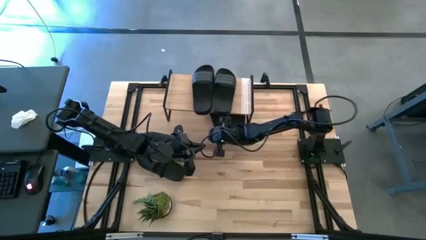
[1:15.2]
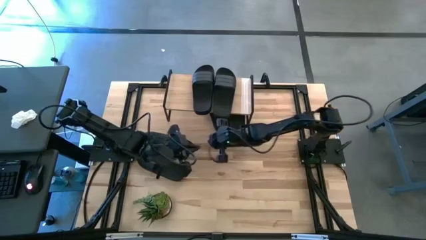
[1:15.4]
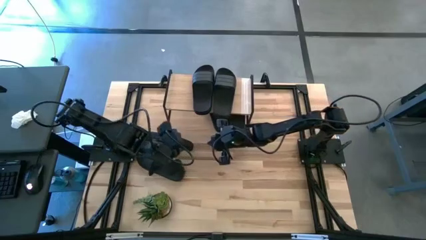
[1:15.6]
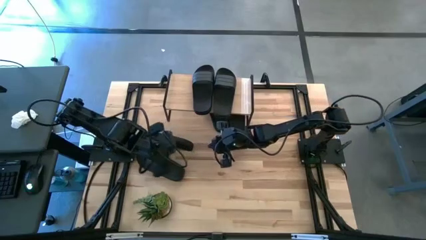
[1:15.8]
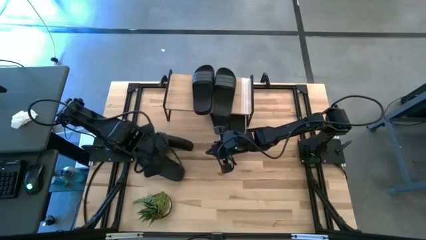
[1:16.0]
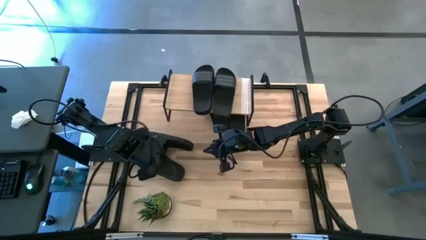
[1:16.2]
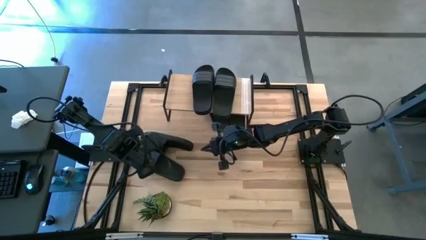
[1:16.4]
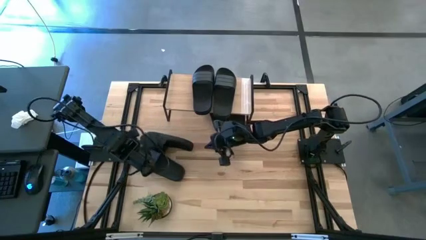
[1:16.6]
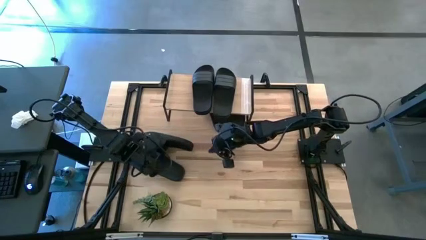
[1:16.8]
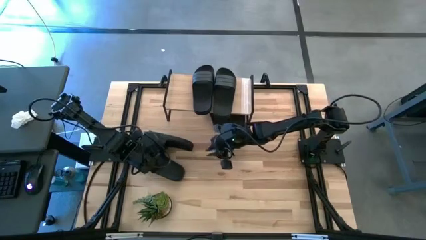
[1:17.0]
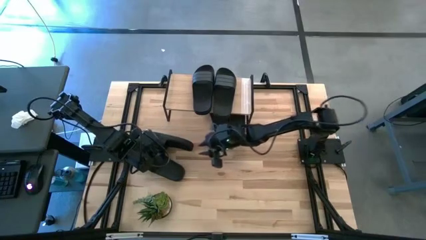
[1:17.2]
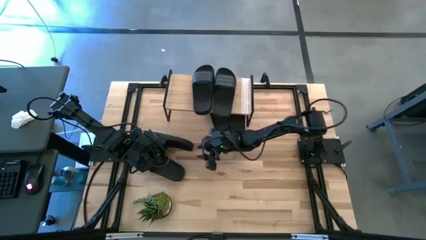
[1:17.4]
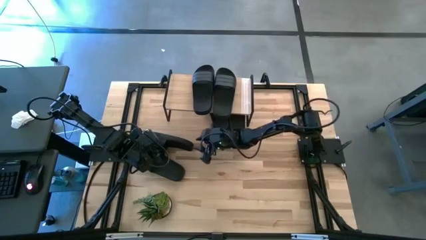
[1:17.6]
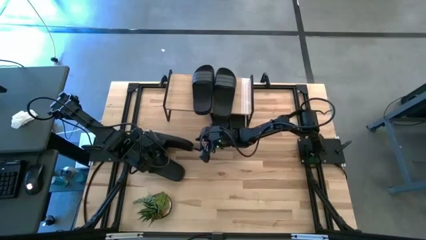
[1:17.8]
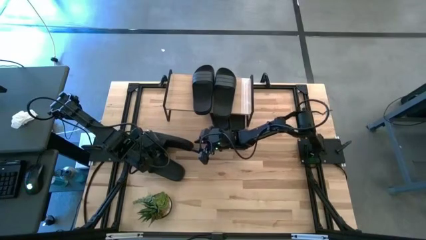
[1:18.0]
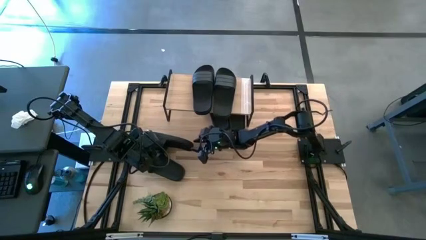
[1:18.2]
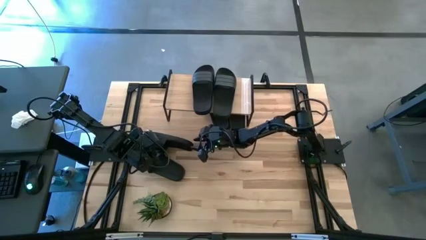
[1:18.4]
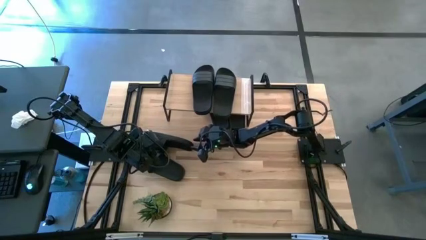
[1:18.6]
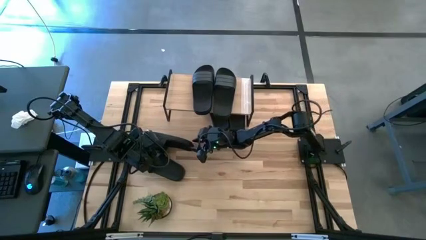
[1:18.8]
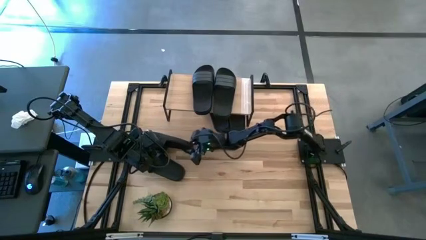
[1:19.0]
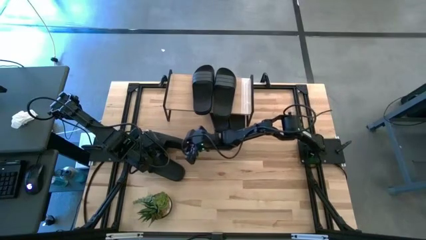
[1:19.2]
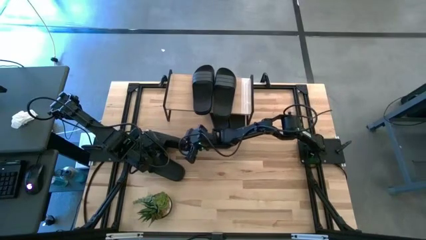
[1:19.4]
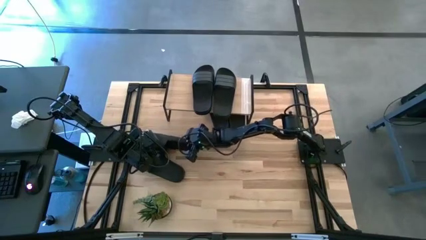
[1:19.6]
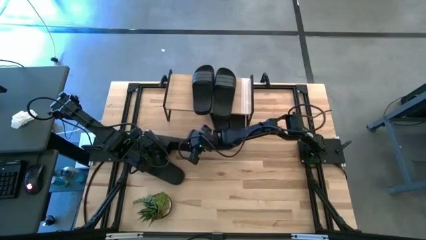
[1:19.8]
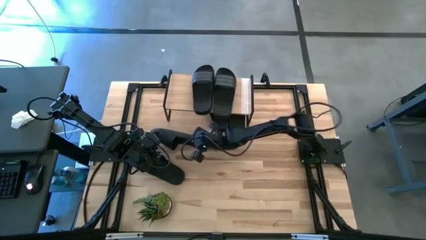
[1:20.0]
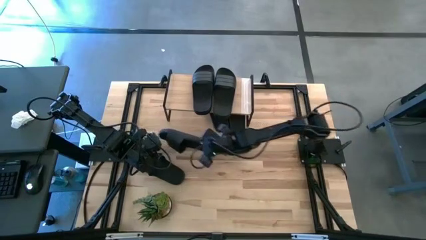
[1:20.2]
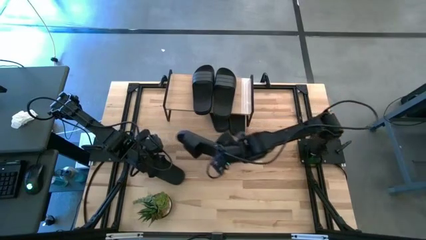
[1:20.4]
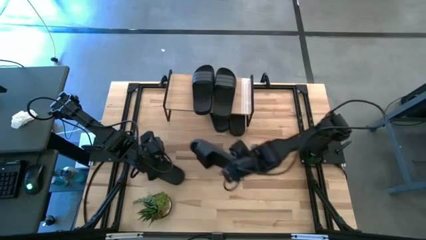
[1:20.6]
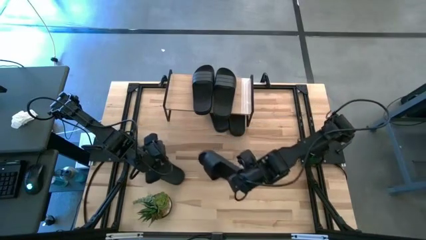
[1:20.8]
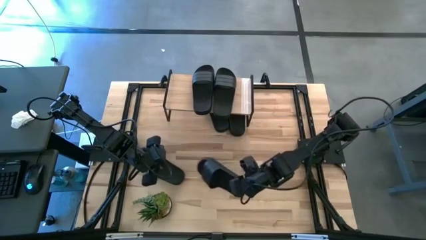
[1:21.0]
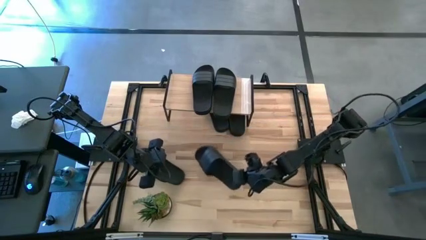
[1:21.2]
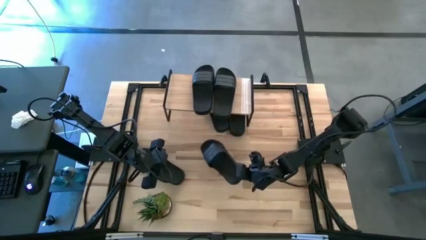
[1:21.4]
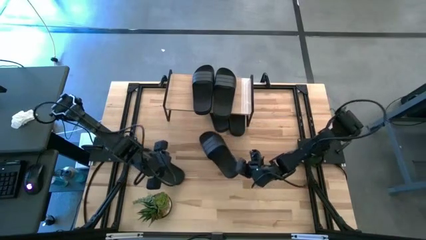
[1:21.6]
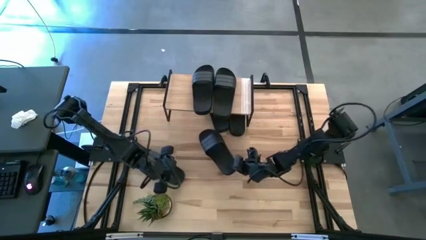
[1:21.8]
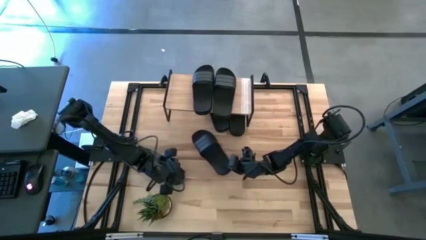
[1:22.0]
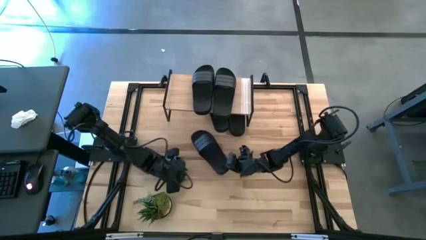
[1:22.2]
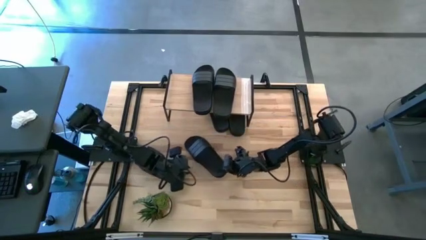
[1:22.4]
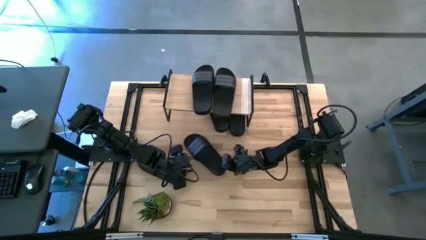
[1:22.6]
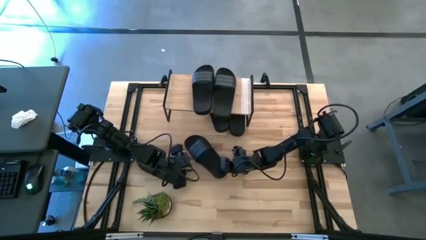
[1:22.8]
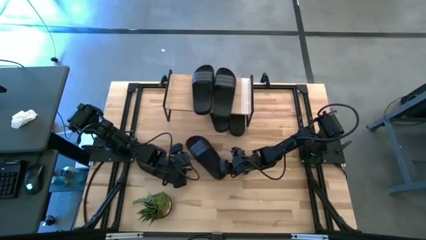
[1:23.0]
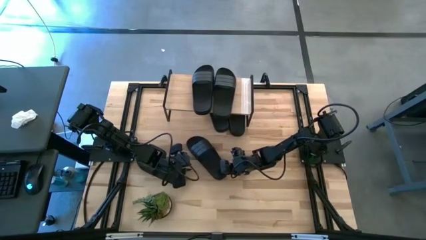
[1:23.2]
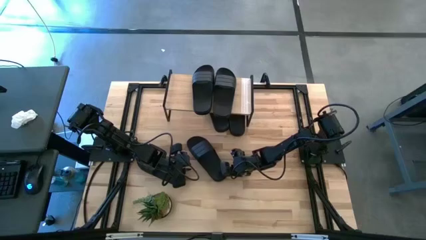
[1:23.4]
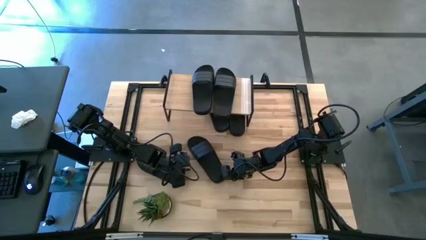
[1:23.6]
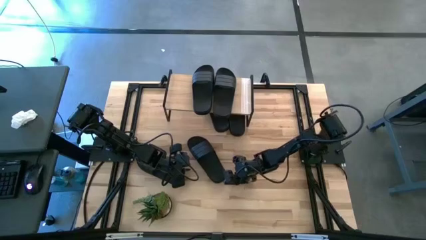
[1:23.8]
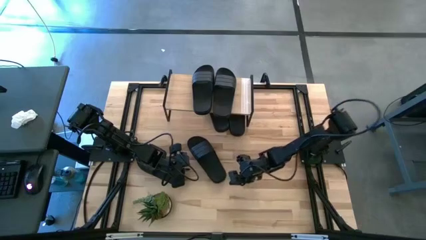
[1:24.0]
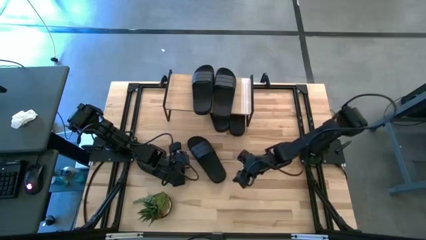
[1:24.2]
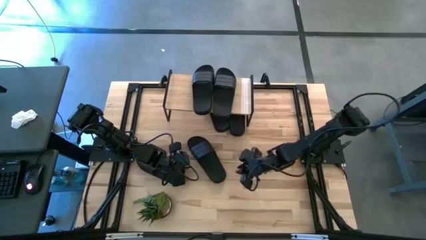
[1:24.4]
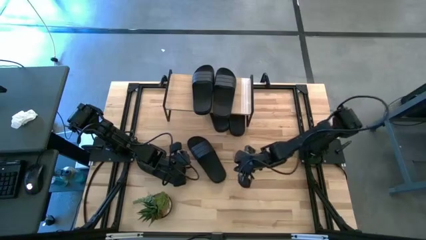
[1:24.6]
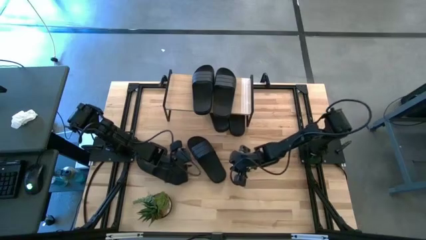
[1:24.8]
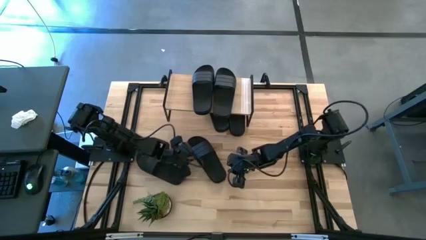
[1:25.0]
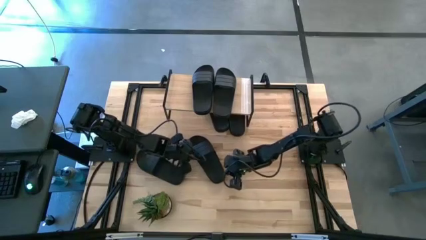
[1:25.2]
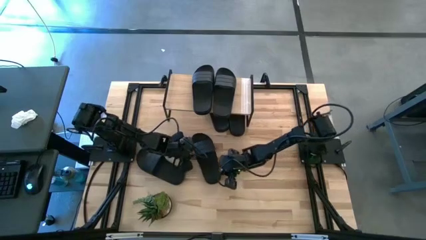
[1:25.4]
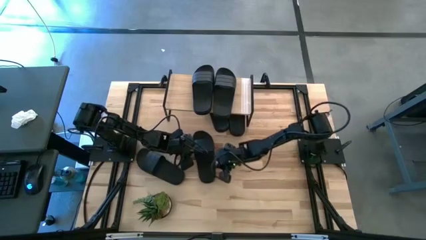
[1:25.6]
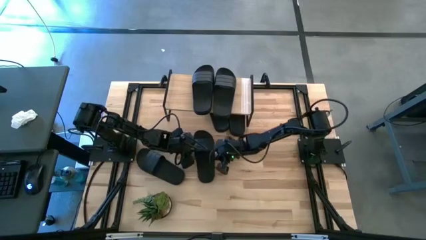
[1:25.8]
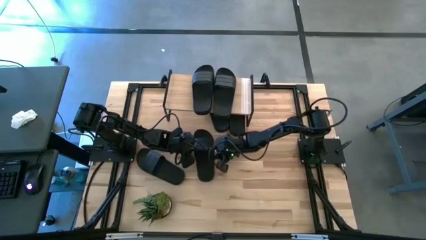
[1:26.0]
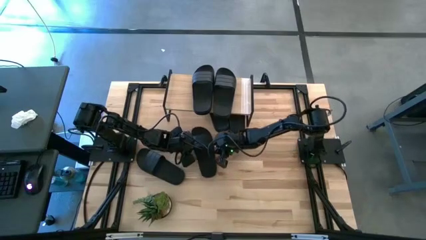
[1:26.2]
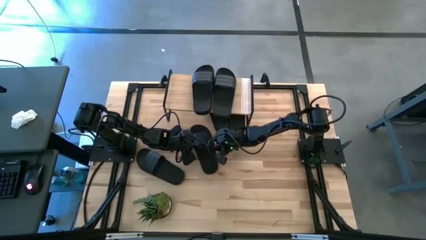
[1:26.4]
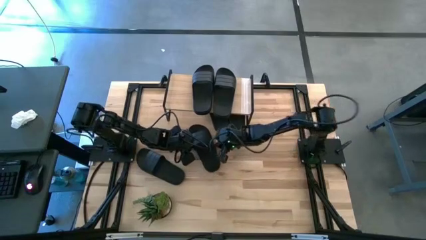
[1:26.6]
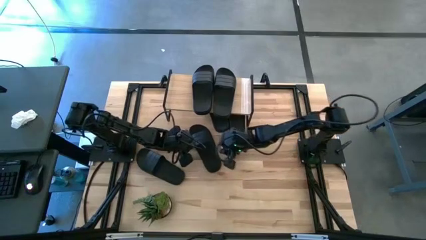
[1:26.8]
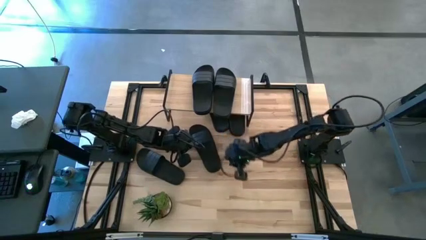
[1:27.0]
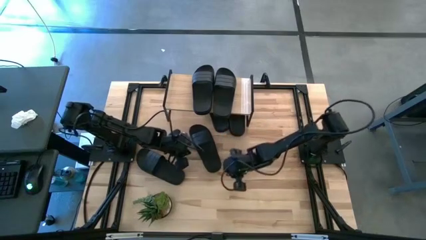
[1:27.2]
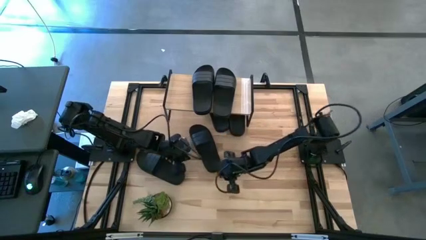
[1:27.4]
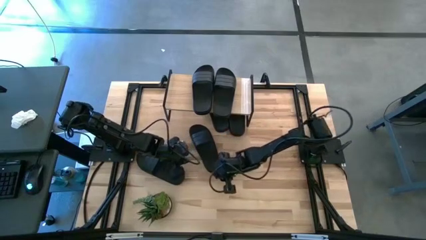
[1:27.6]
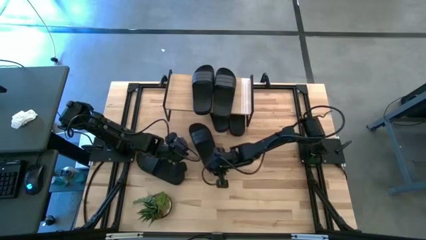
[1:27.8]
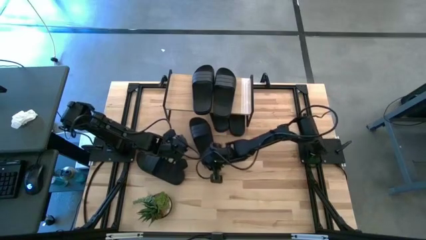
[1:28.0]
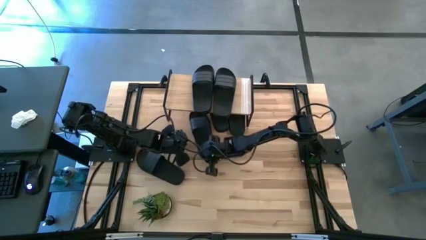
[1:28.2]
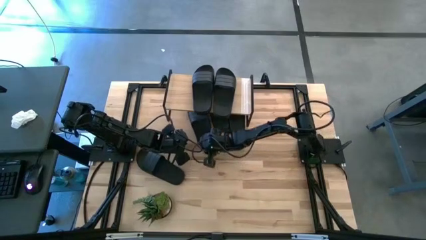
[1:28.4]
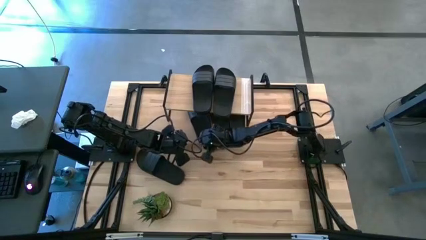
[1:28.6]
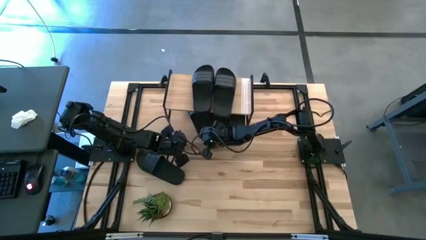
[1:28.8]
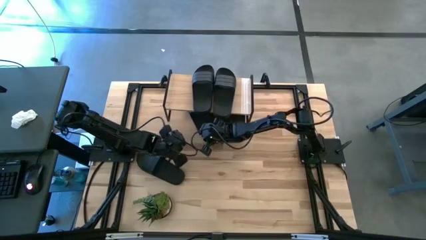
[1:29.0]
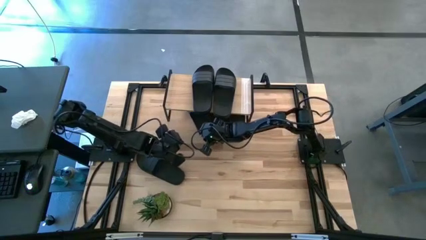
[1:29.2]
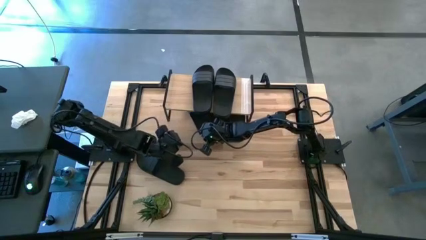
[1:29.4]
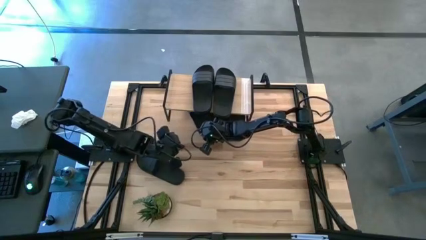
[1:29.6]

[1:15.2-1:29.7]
Task: Pick and place slides into the shelf
Put the black slide under the shelf

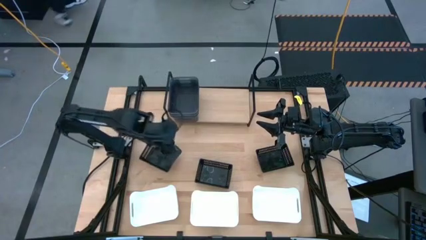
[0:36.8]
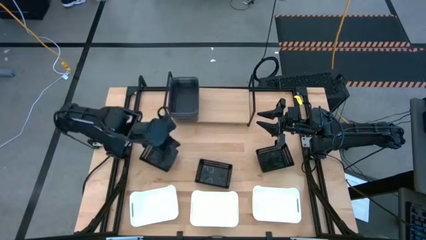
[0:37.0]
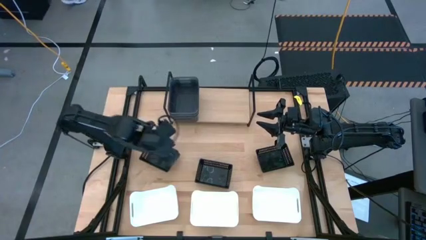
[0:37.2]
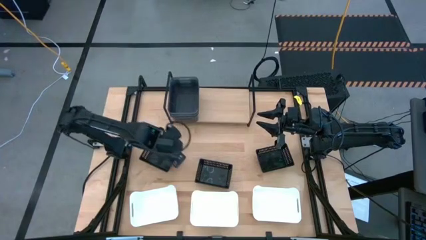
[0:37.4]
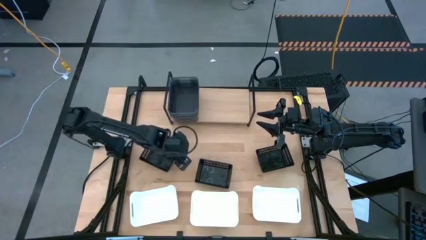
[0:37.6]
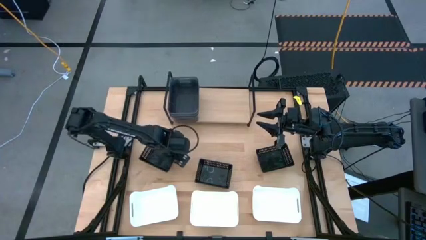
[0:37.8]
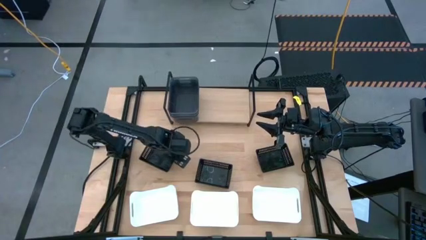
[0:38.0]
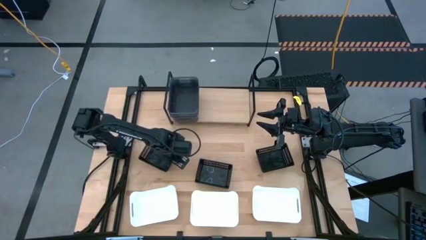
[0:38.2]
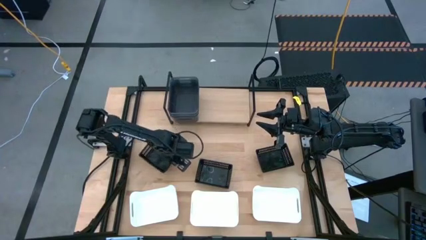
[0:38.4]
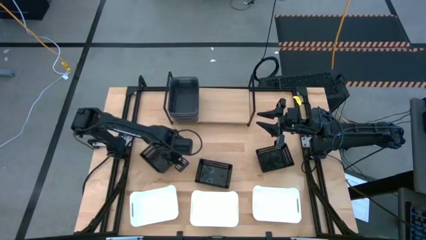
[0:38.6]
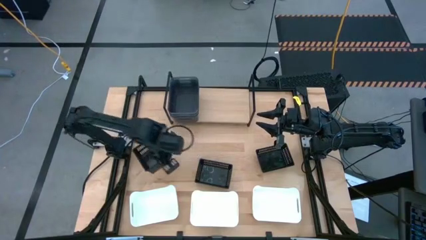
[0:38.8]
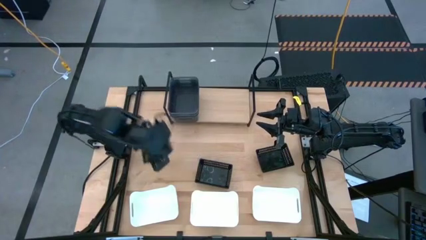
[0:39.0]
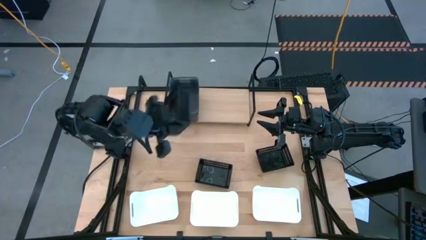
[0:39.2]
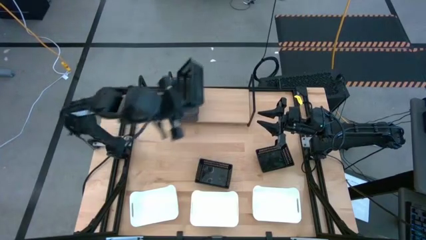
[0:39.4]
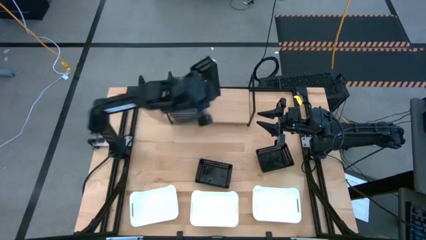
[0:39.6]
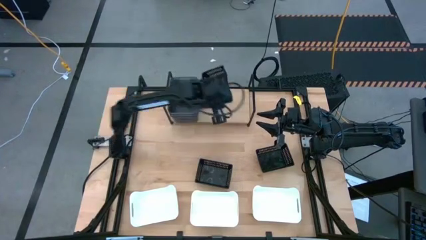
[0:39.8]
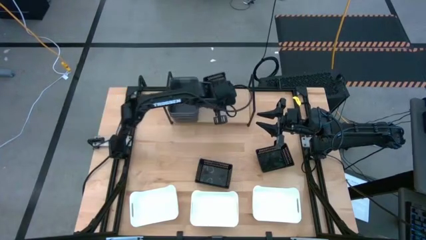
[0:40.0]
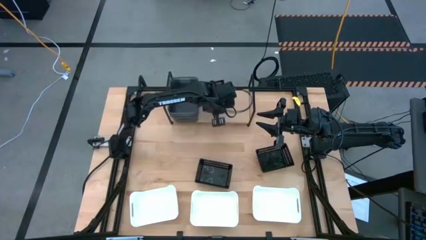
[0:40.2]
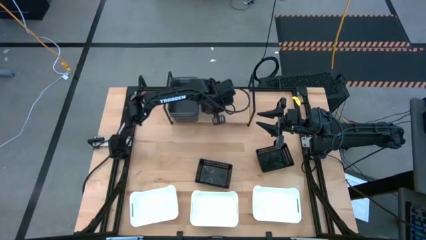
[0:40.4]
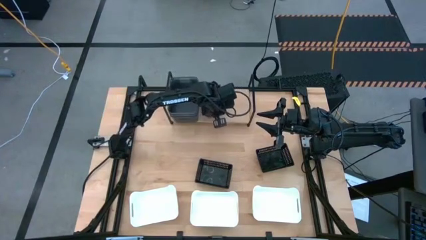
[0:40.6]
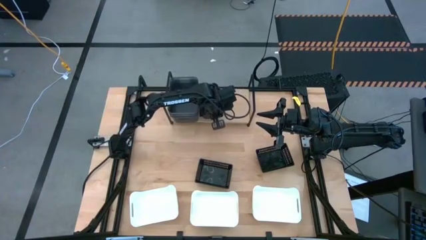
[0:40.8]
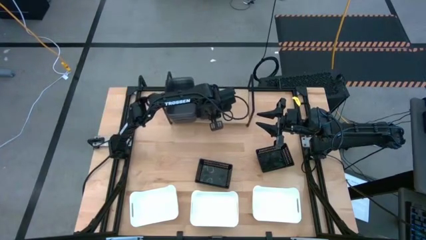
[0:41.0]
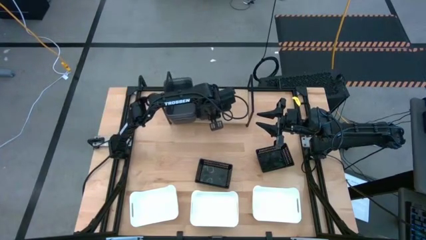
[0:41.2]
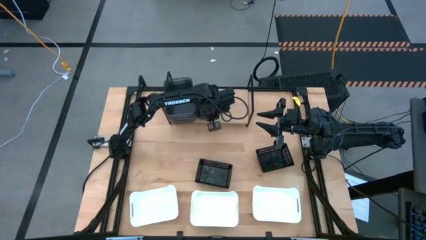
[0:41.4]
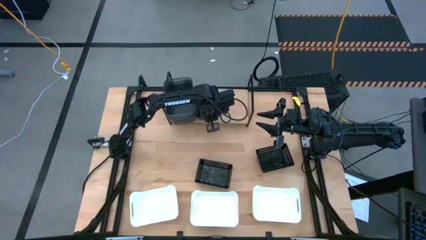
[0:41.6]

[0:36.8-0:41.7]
Task: Stack baskets on shelf by color
Put the top left black bin on the shelf
